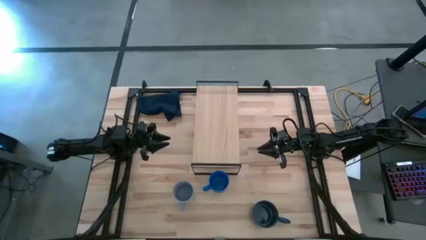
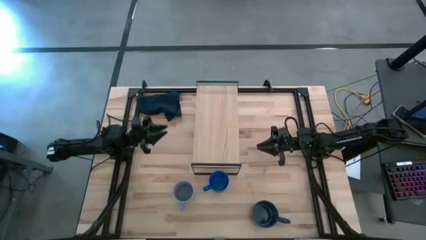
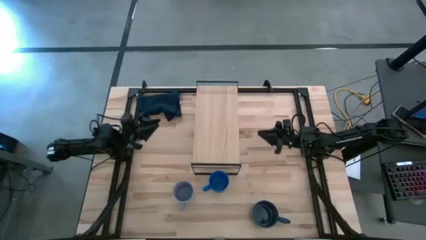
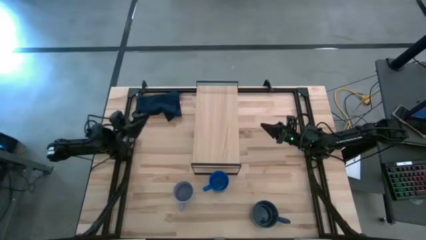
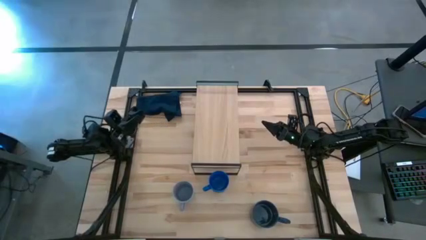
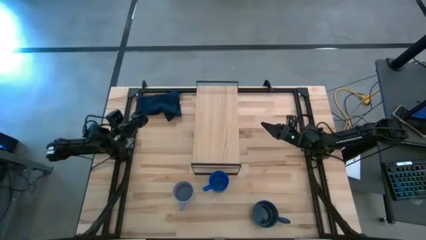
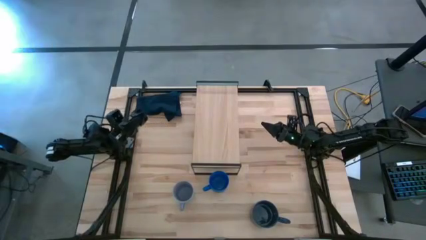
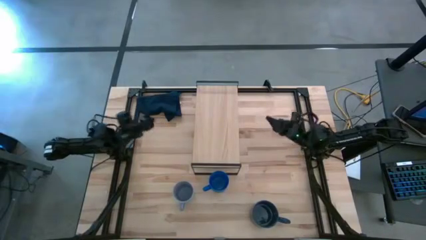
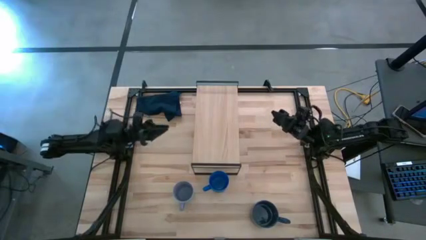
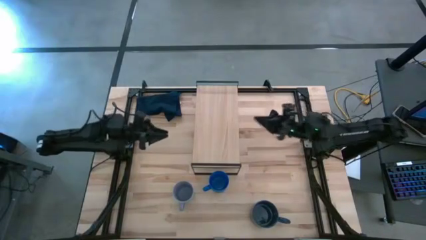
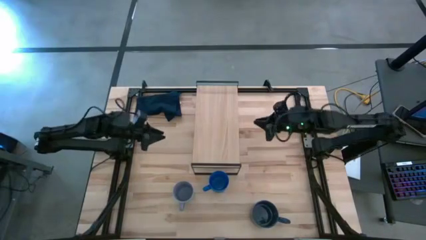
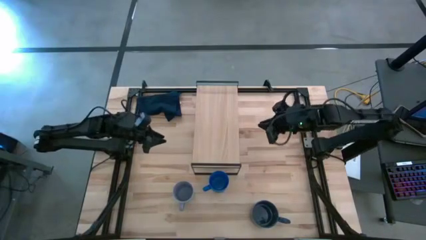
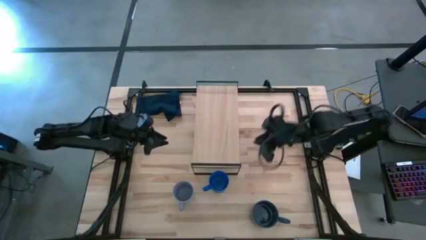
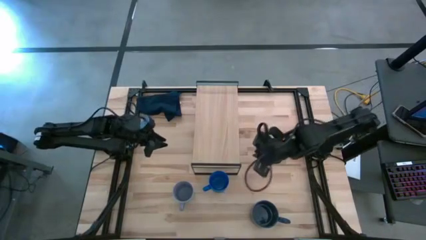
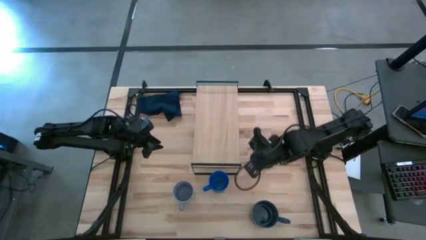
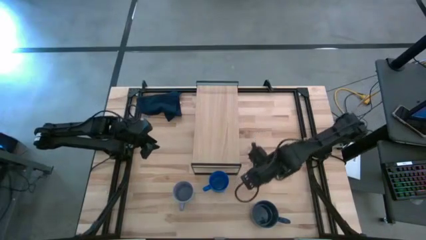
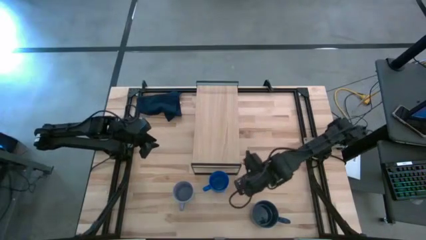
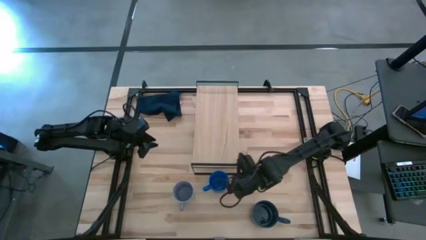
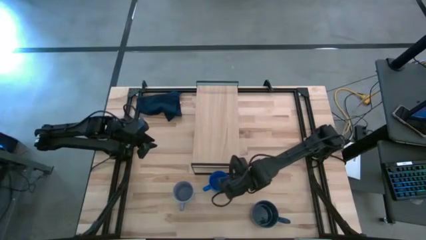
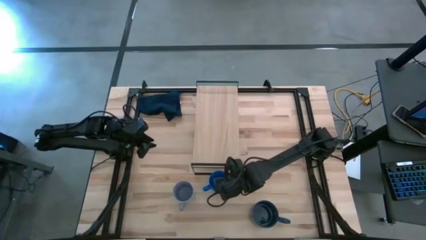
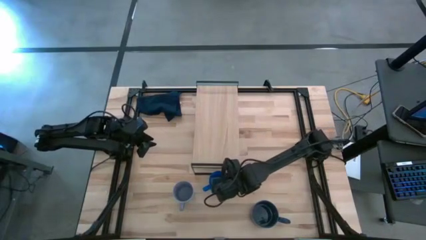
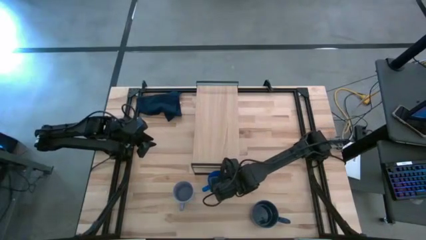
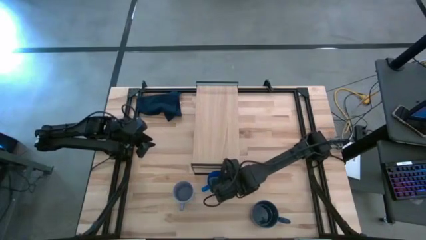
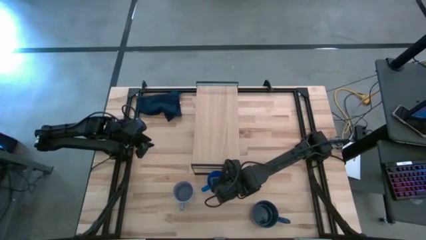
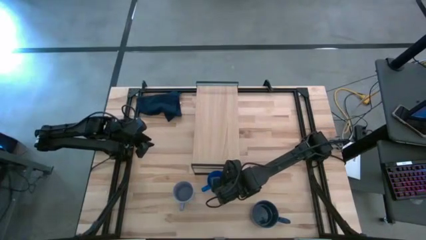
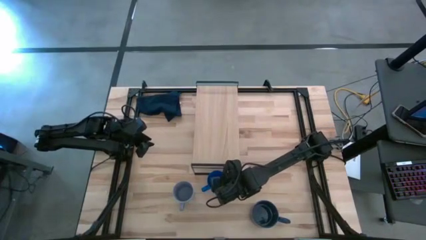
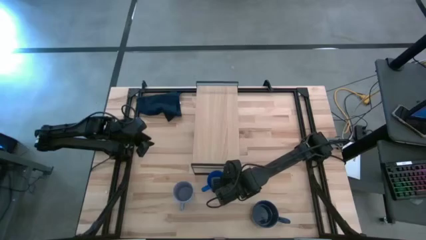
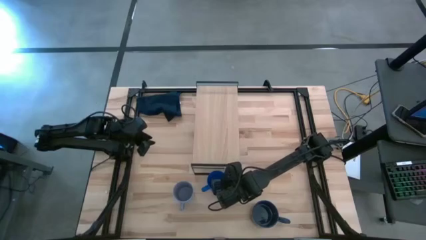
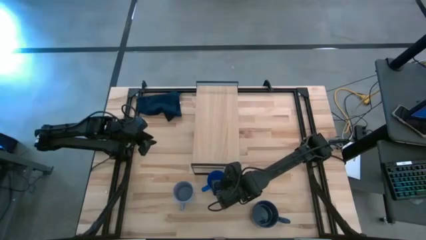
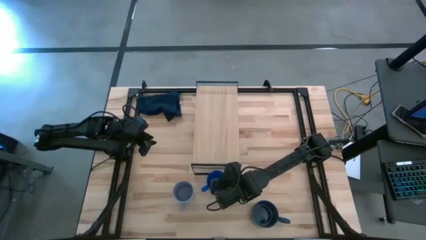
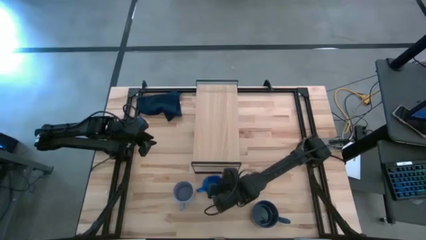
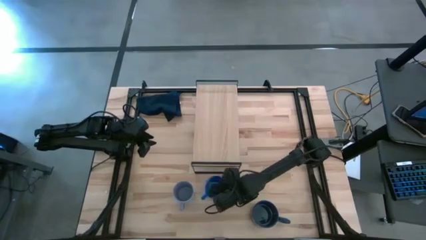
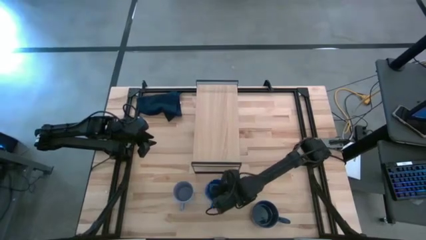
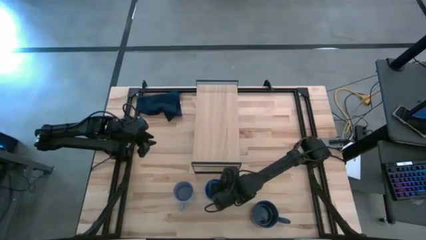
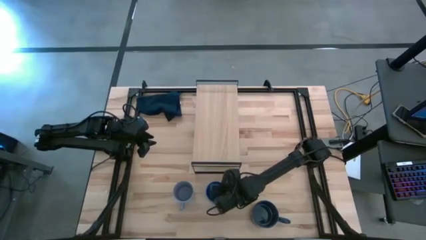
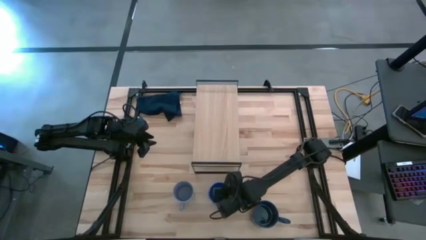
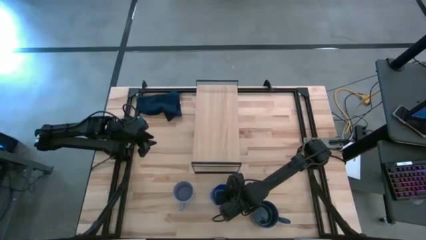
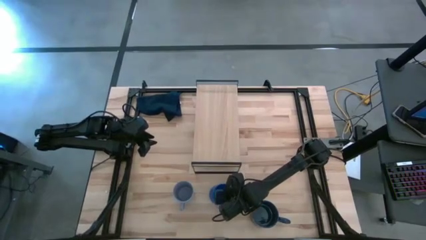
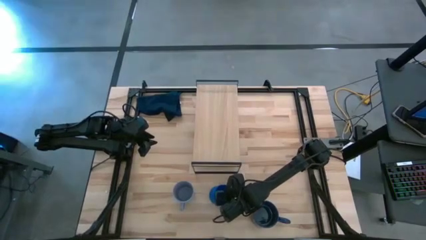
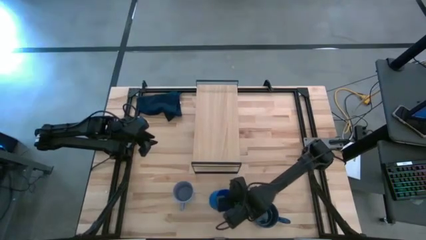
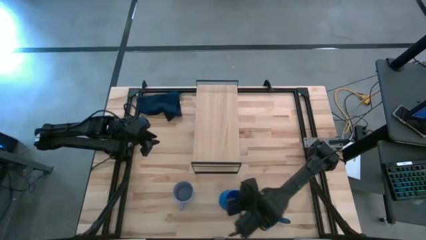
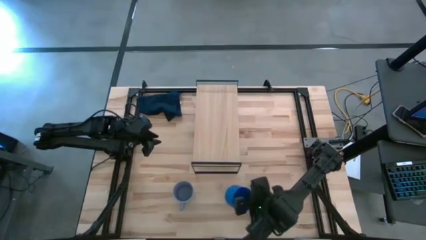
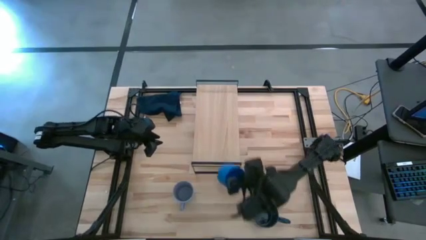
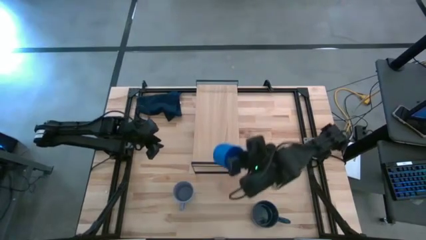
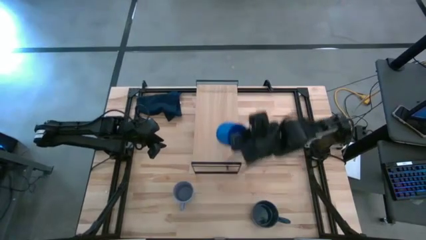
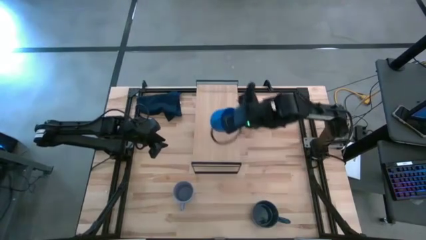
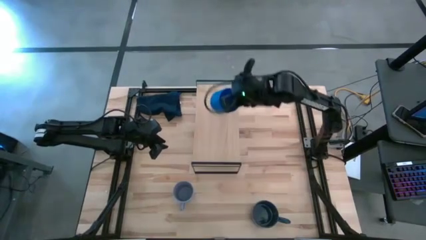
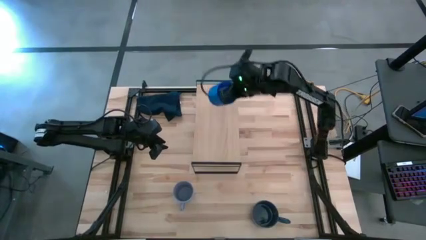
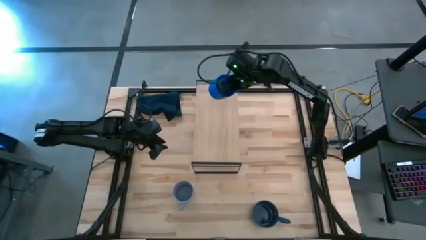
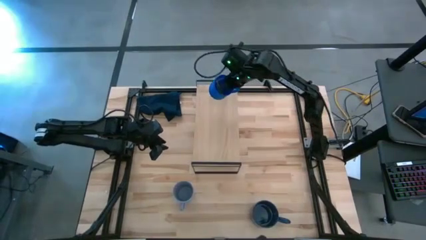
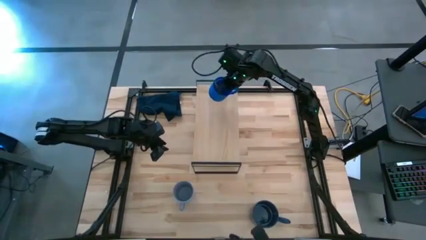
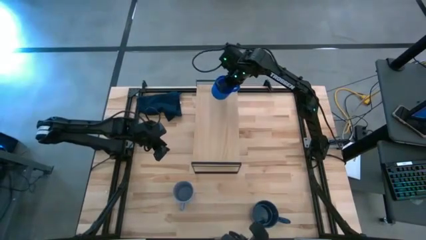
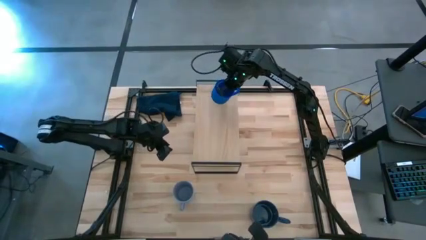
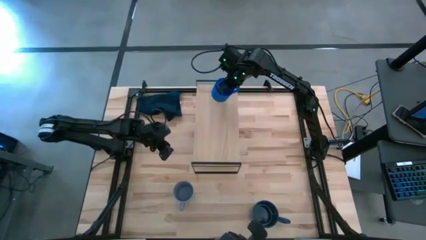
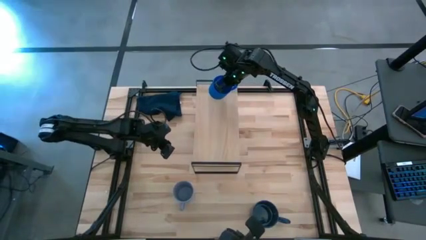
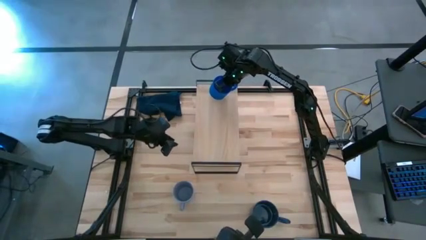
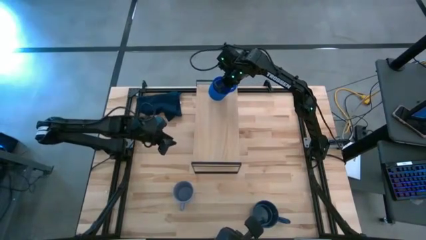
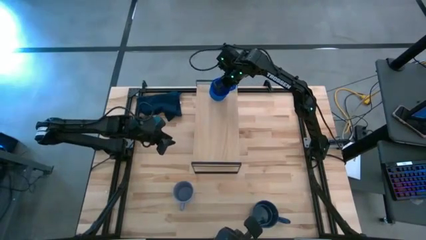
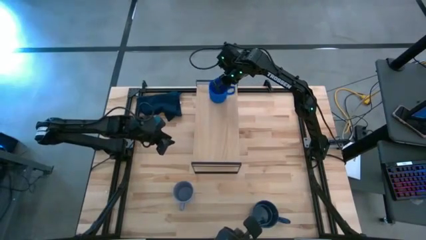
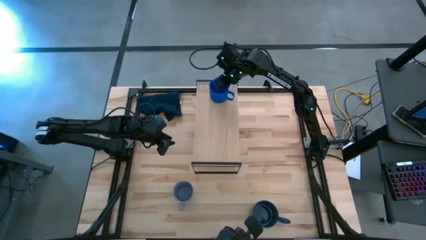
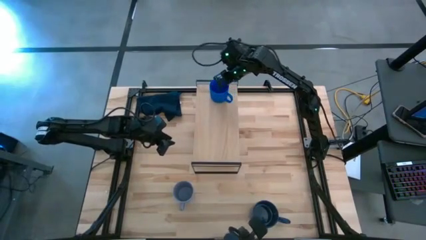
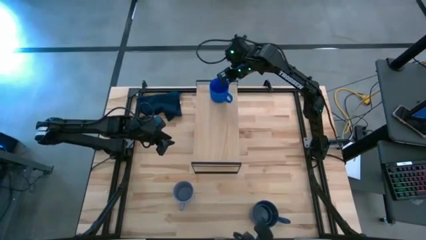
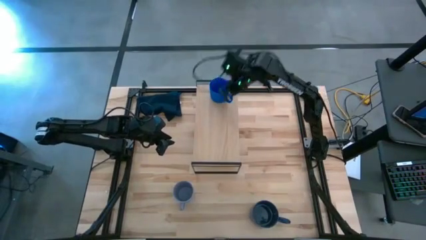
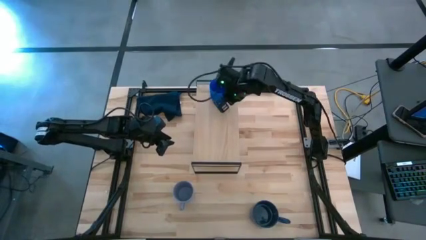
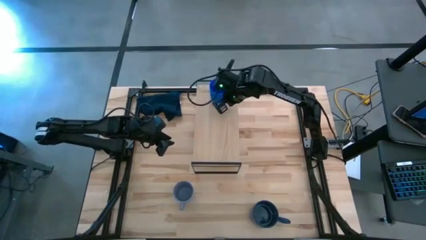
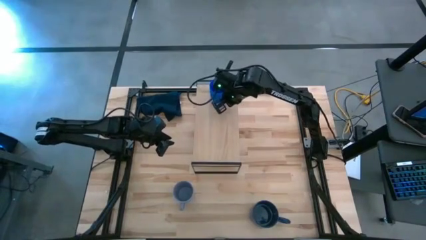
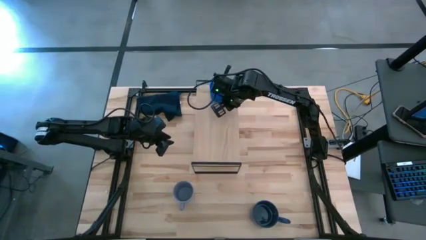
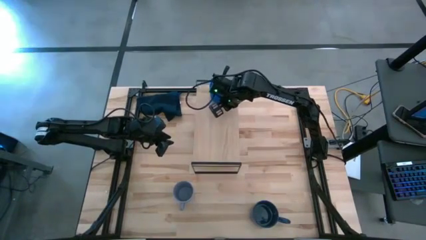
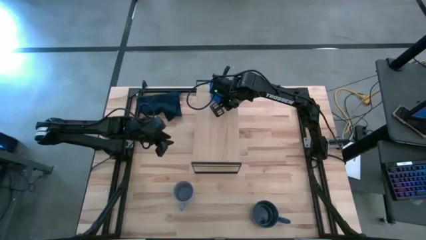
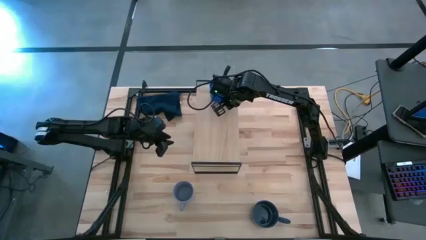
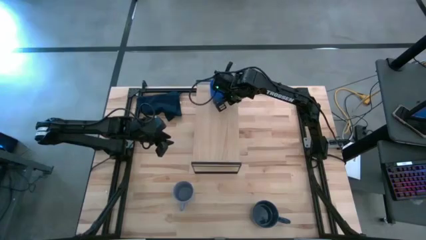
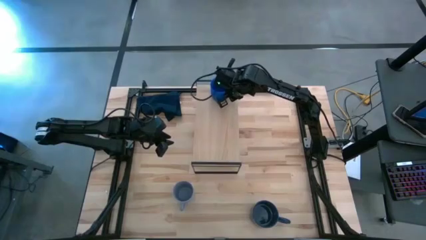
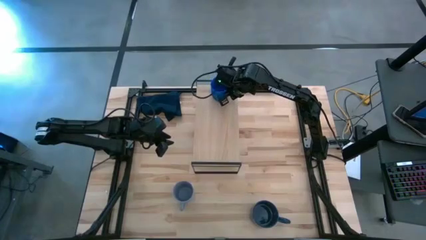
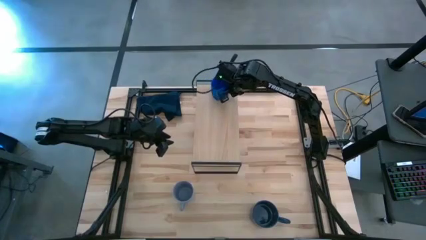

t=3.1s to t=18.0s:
Task: Stack small to large cups/mugs on shelf
Put the blue mug on the shelf
